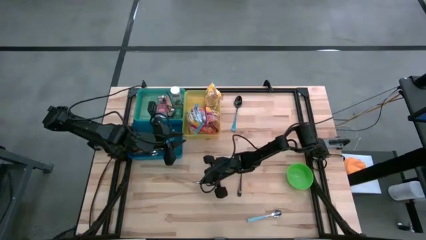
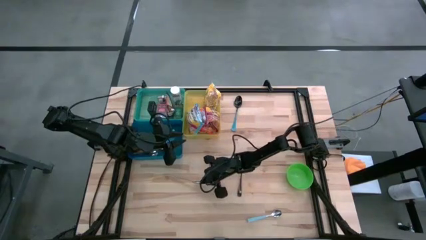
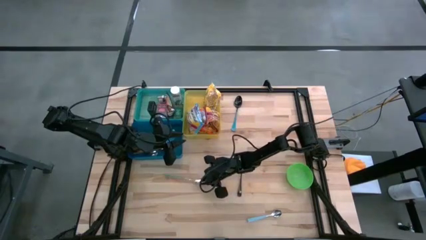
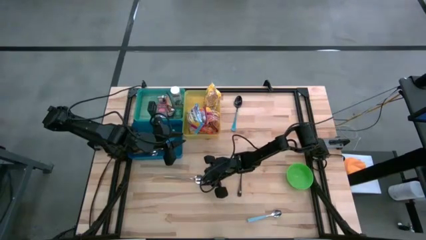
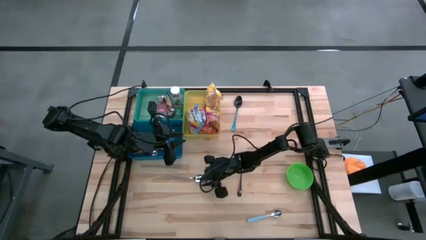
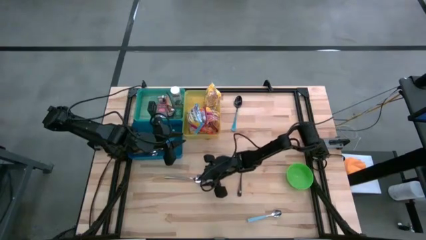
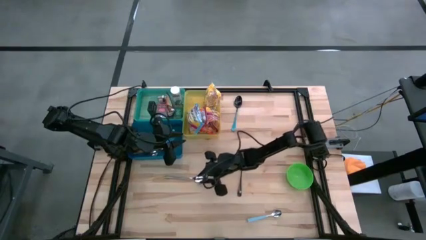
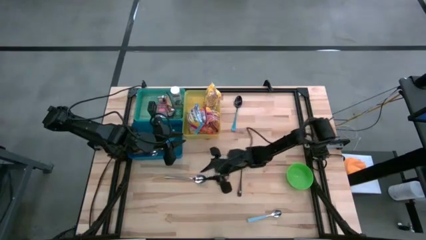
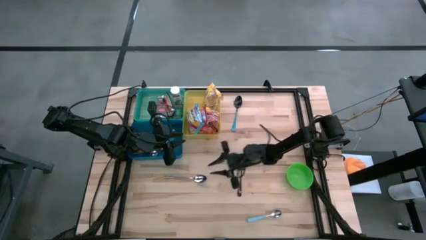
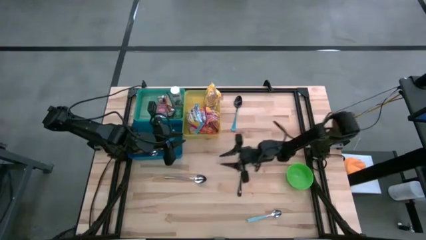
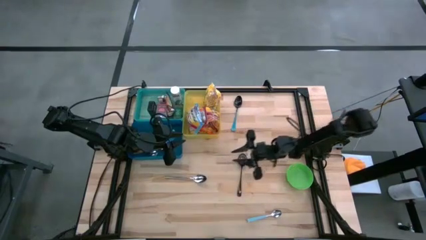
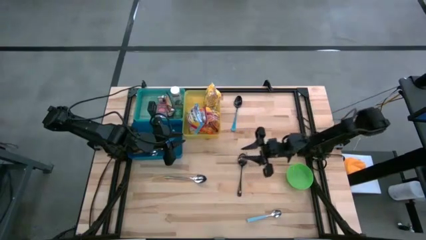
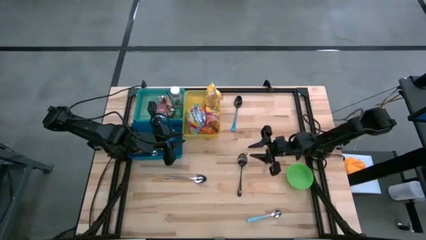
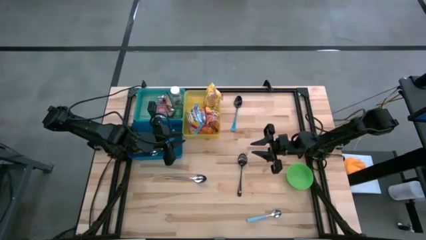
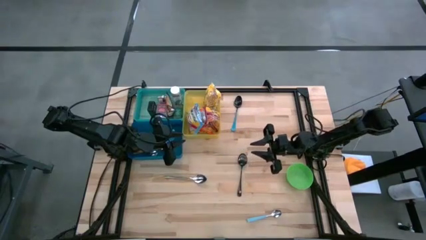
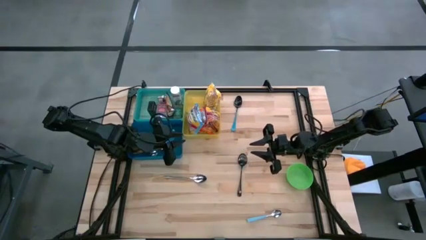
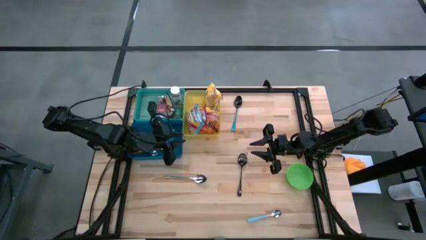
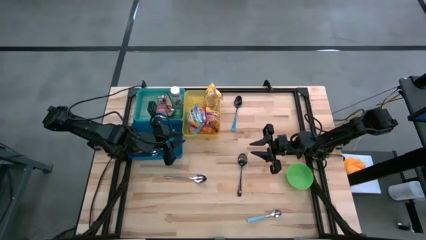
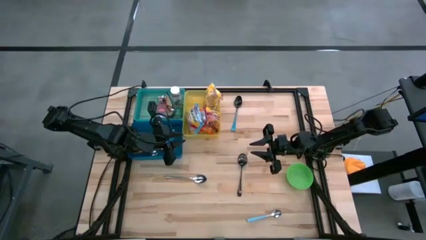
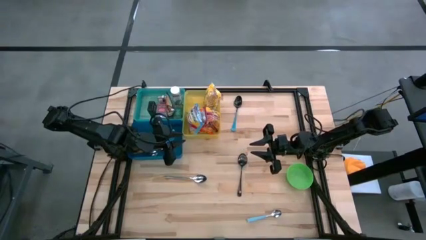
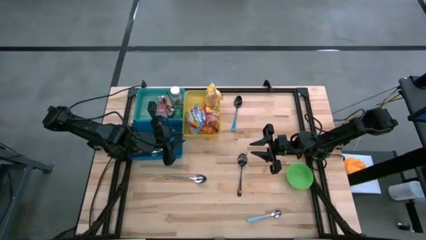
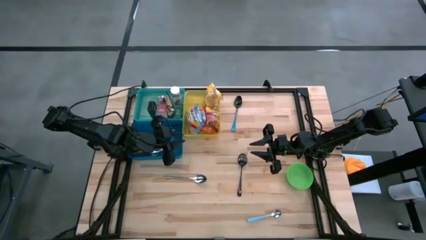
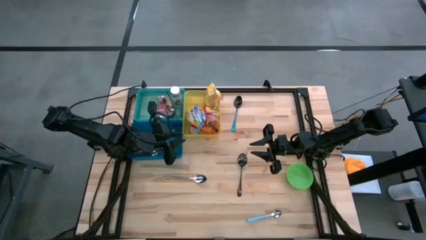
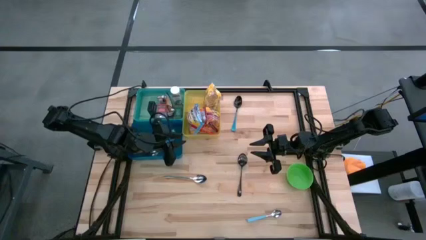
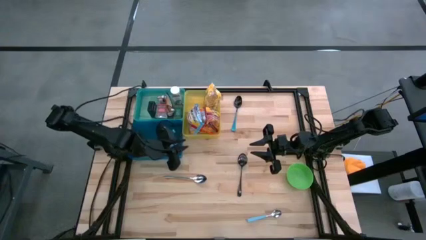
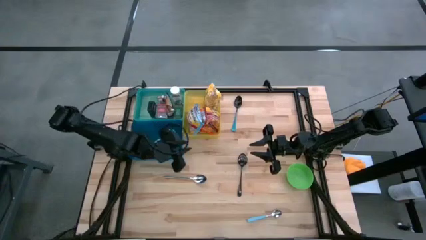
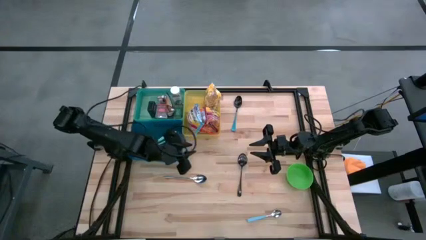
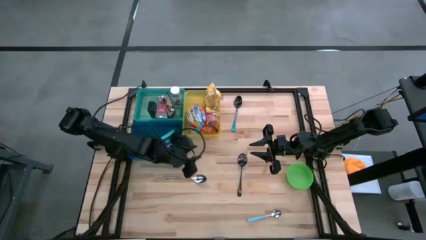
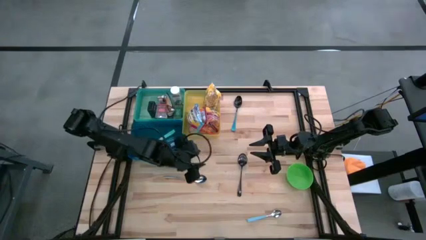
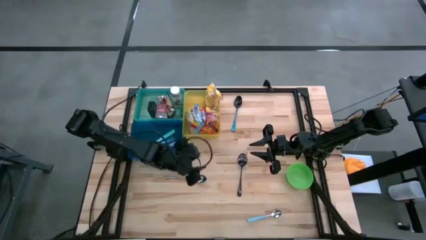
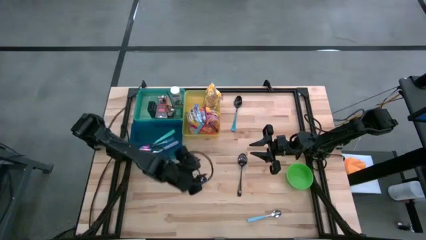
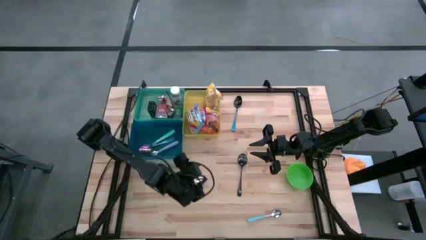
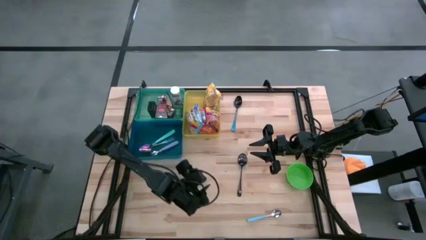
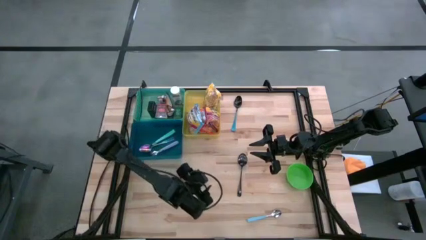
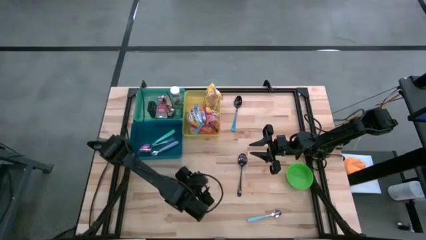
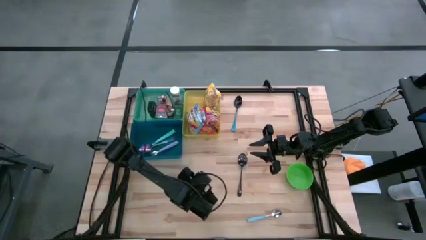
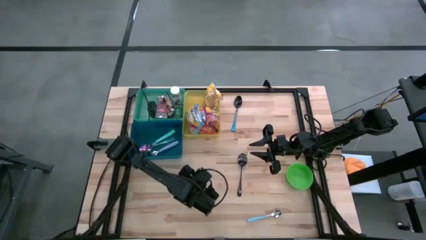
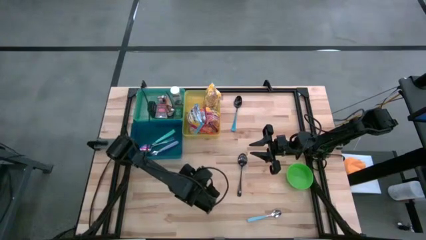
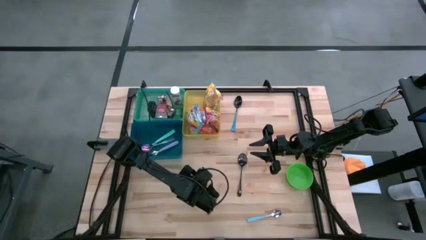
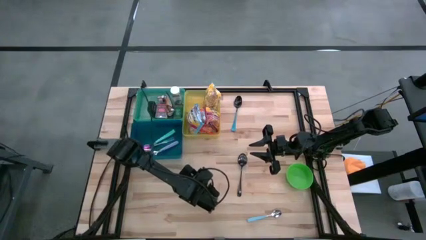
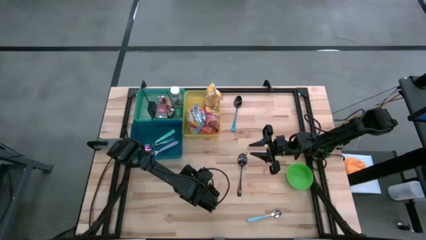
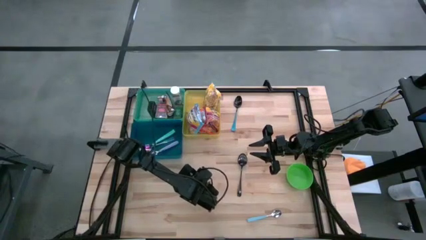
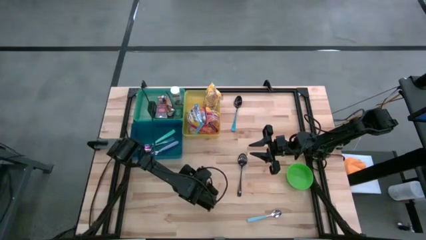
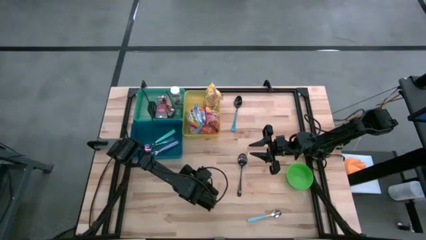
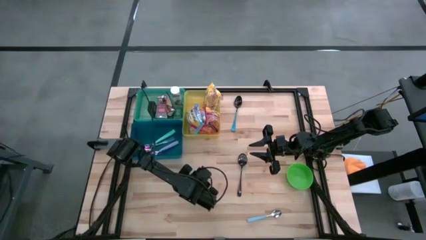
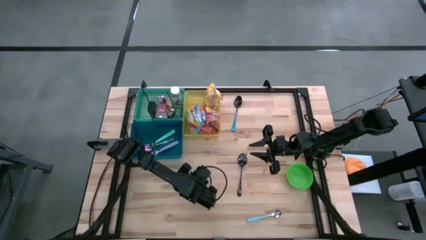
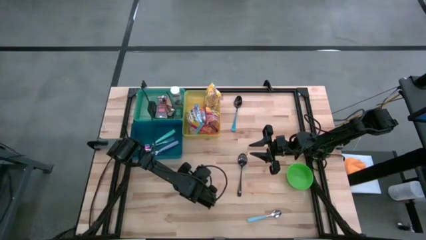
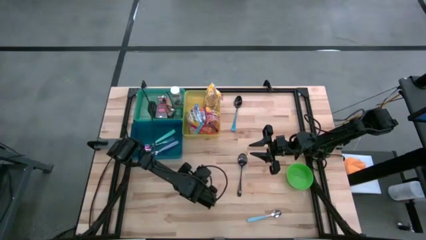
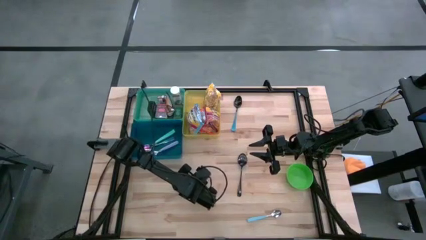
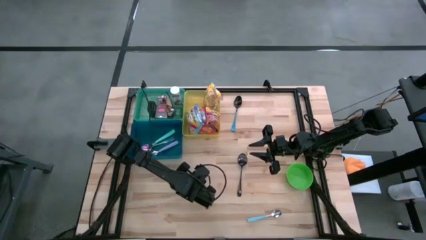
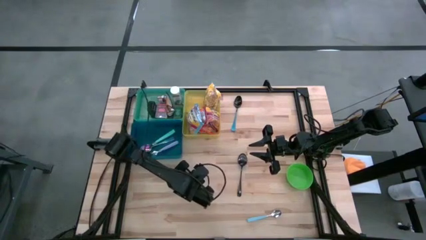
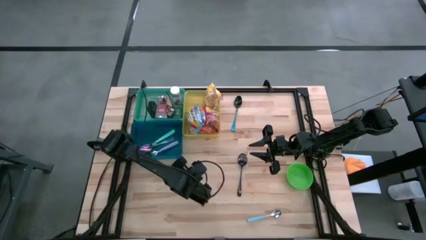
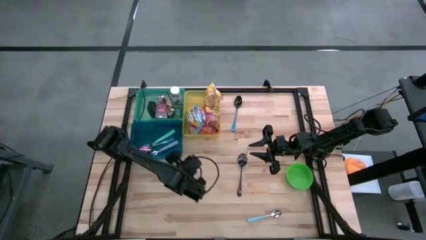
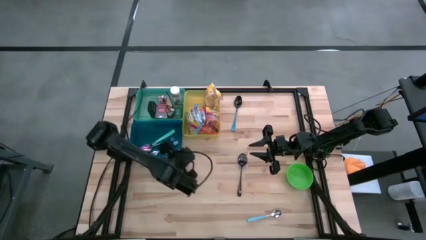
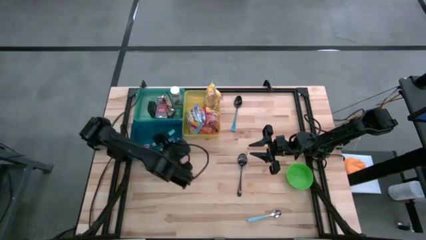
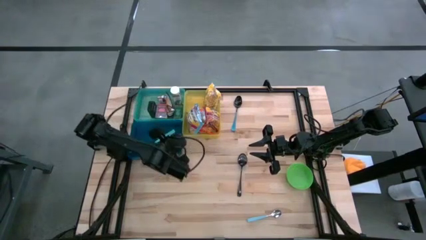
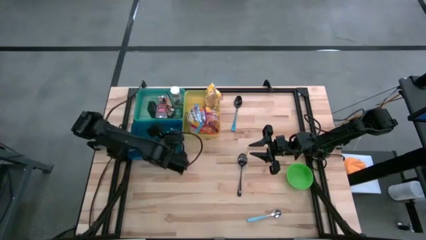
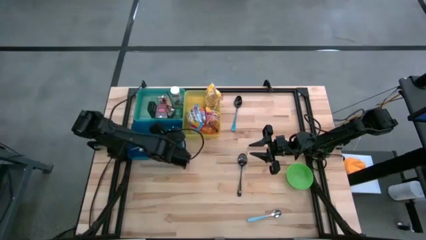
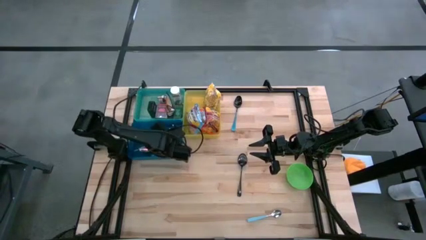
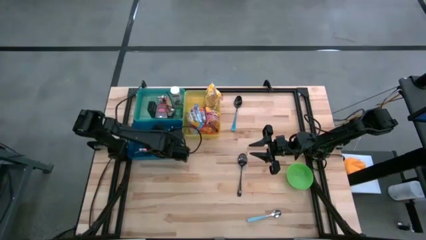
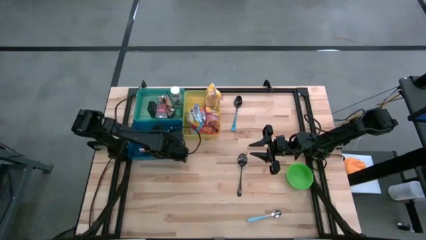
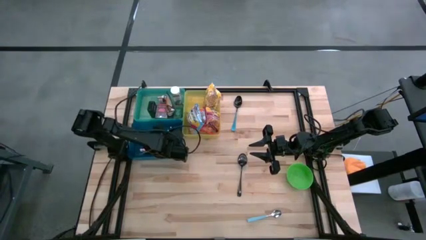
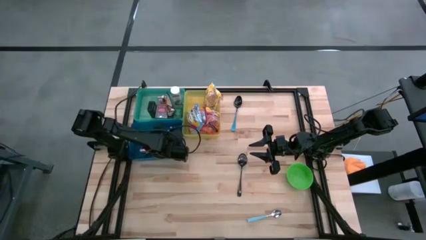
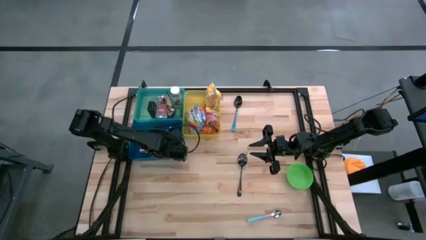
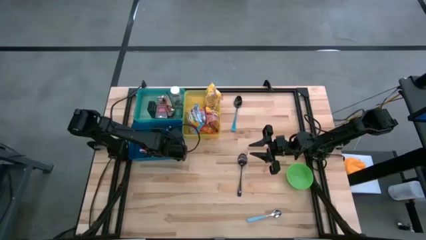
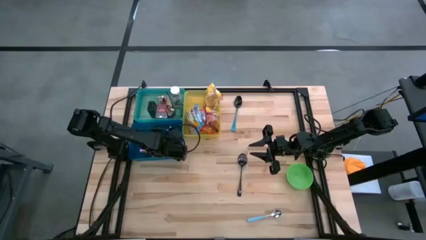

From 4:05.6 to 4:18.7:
Put the silver spoon into the blue bin
